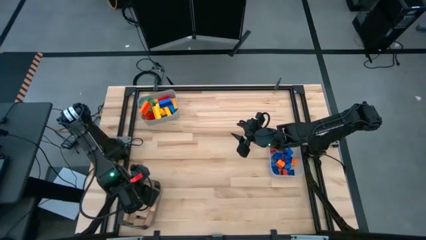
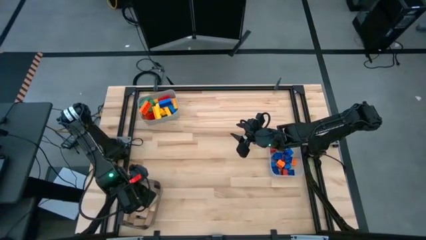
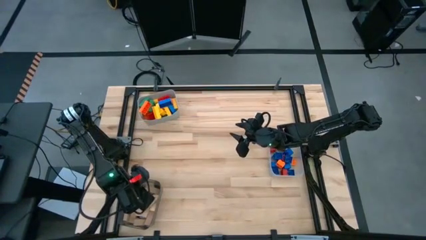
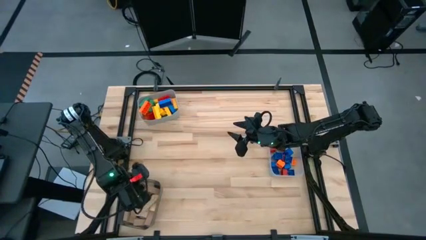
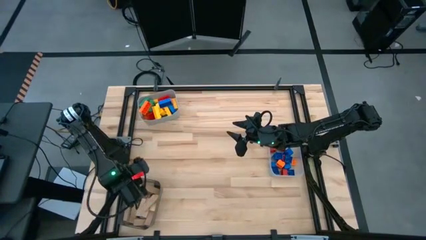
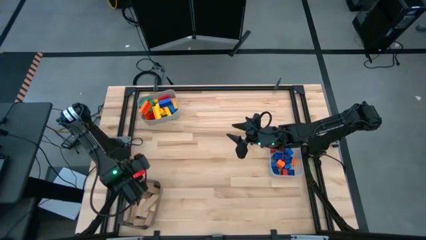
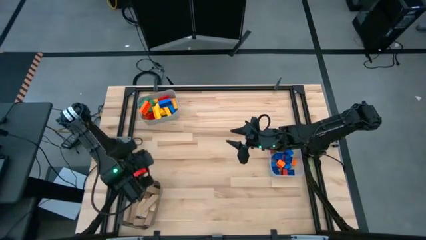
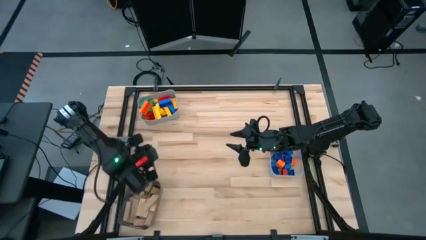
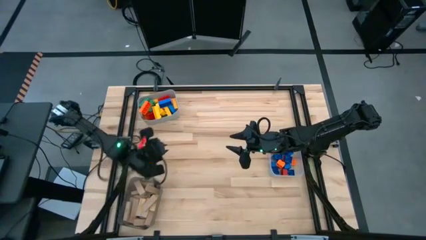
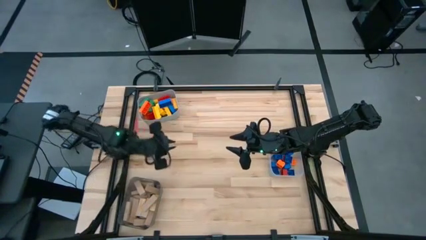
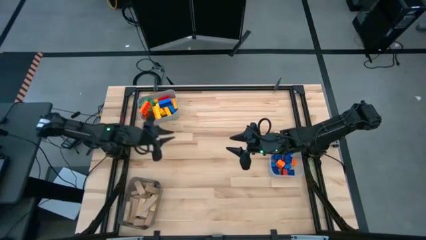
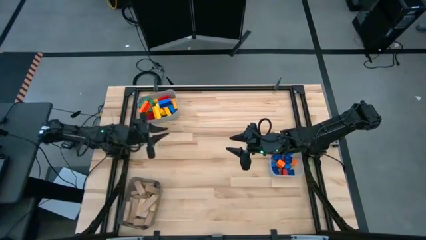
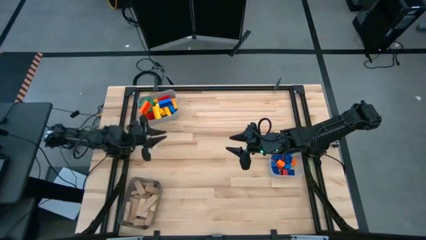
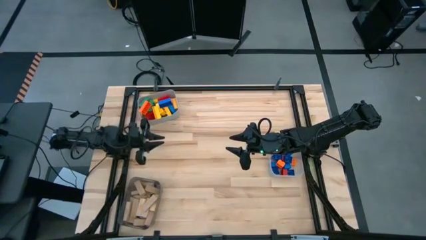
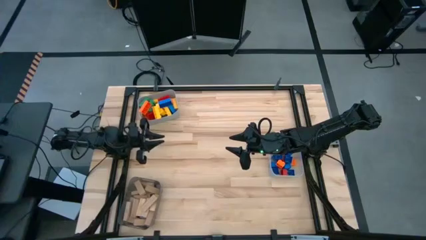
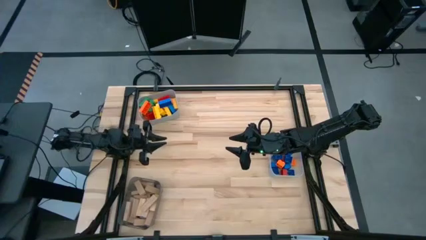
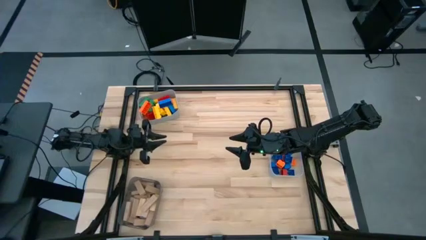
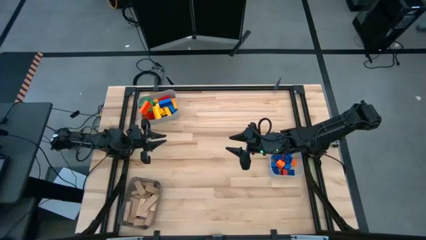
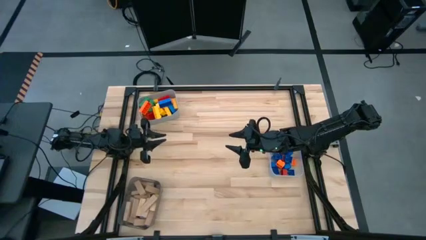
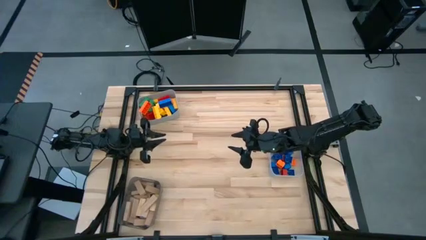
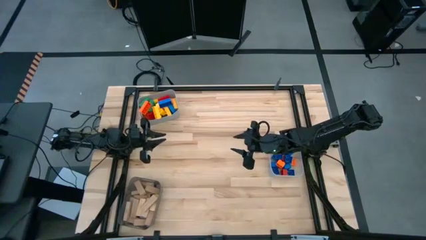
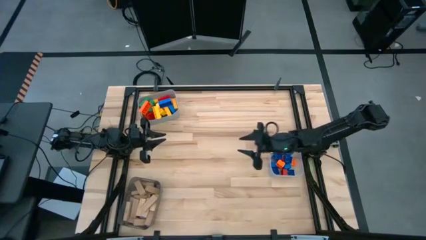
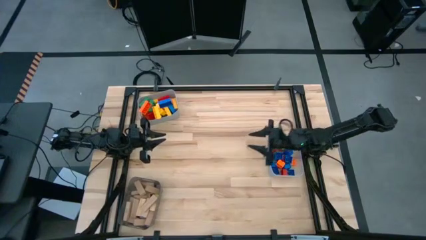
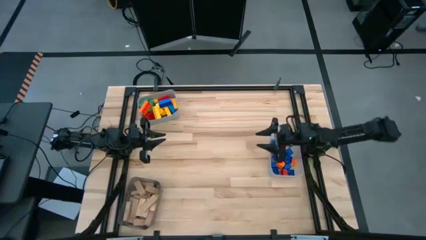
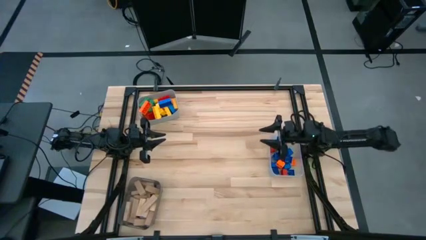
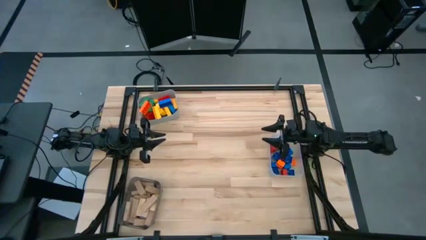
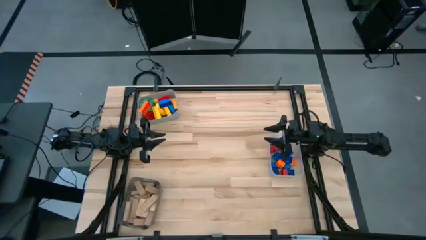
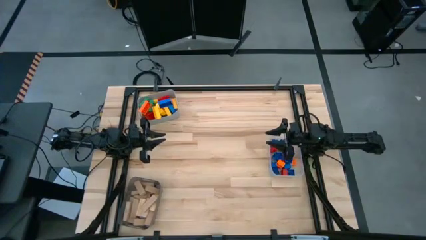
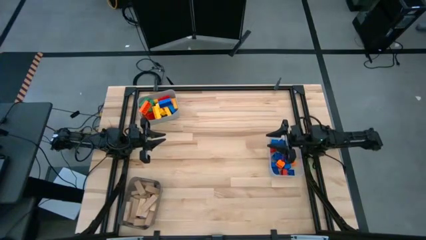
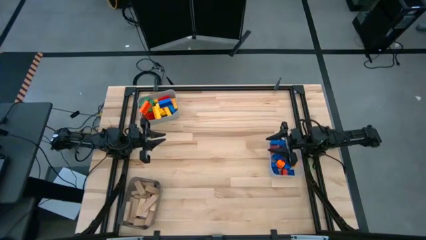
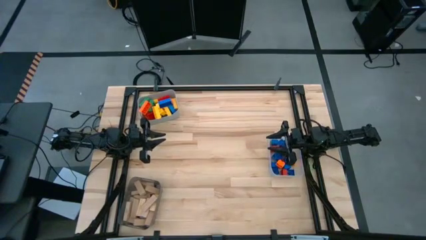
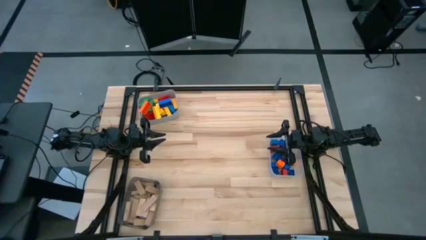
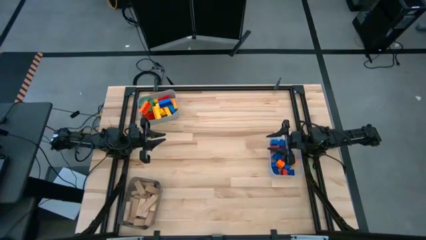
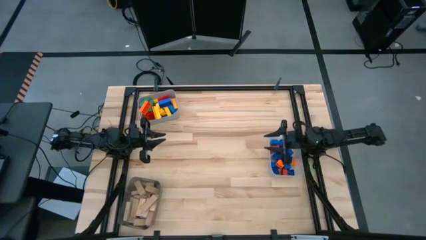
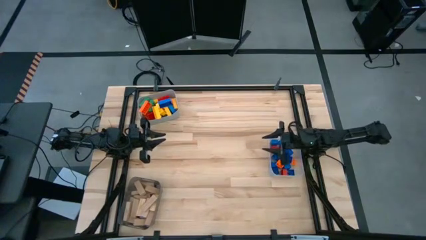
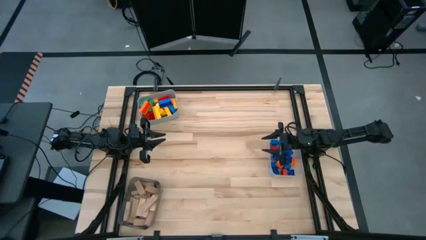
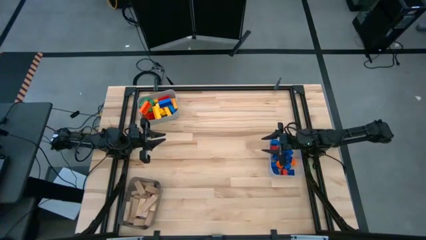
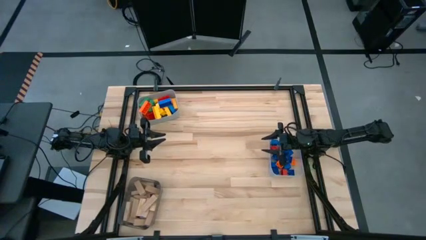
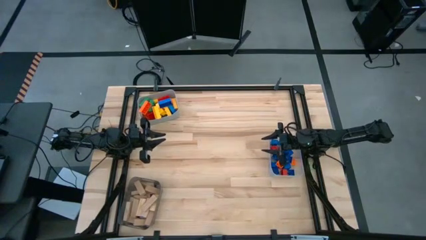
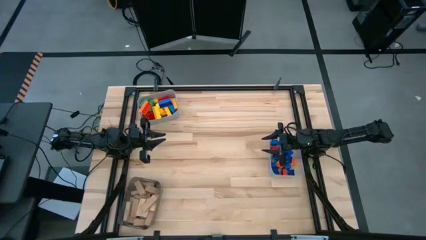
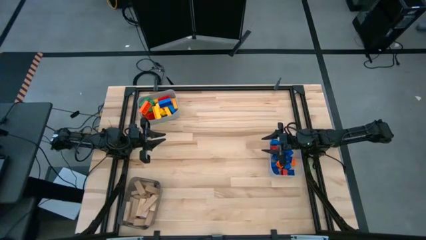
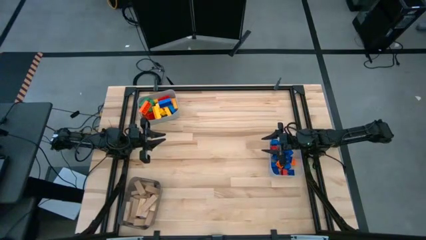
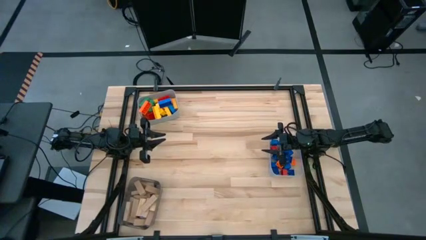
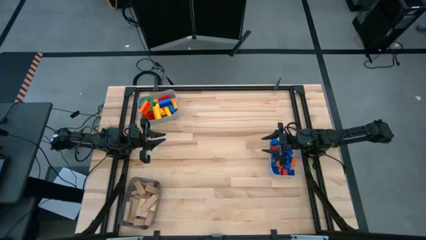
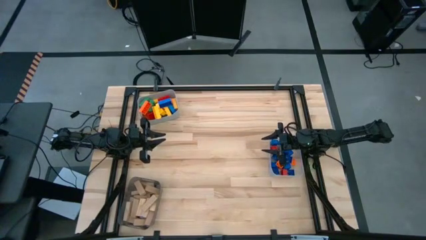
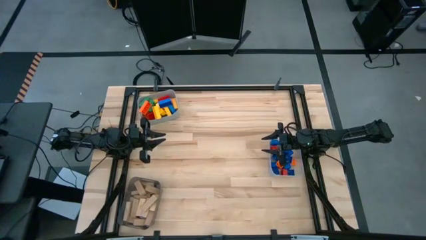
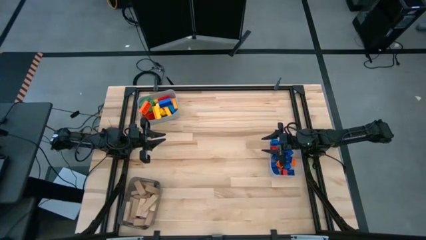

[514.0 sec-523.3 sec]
Task: Sort blocks by size
Return to Home Position
